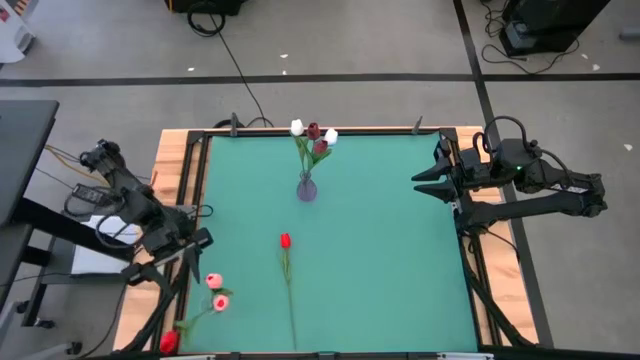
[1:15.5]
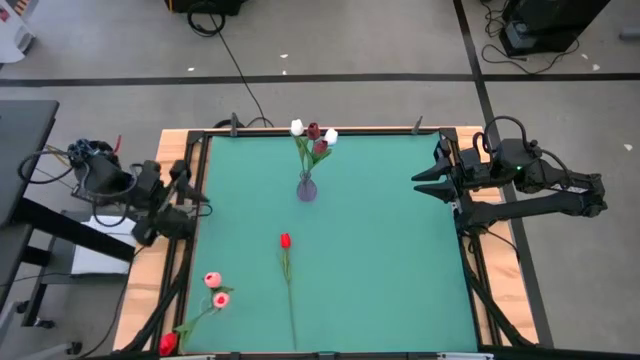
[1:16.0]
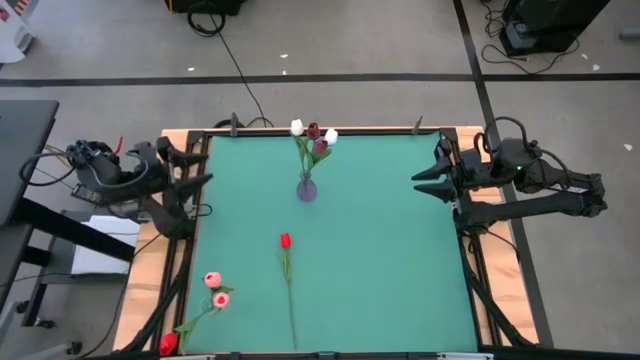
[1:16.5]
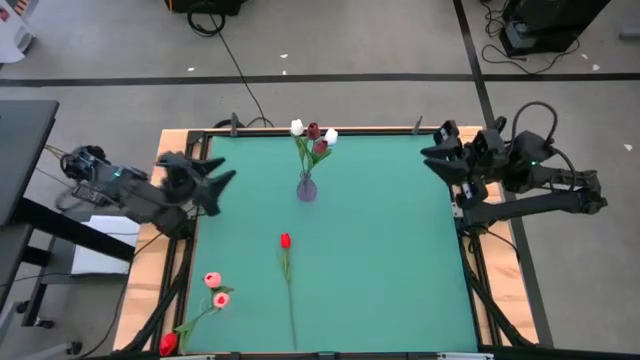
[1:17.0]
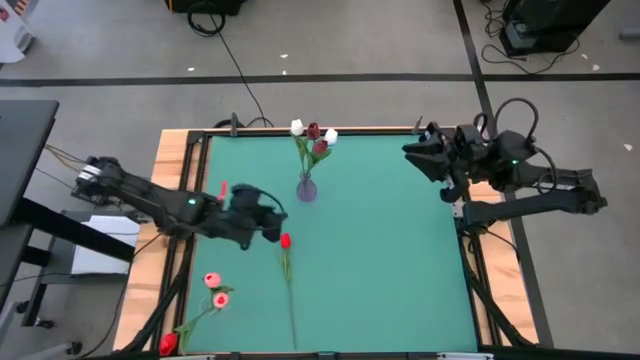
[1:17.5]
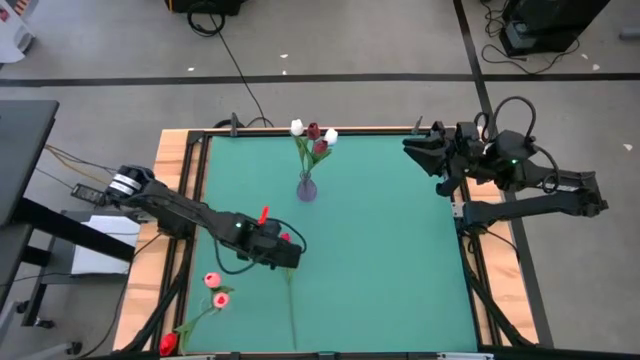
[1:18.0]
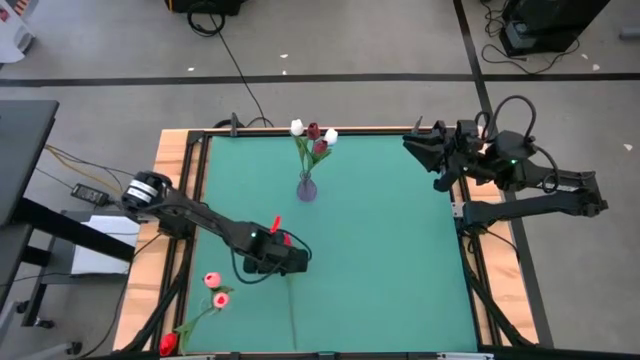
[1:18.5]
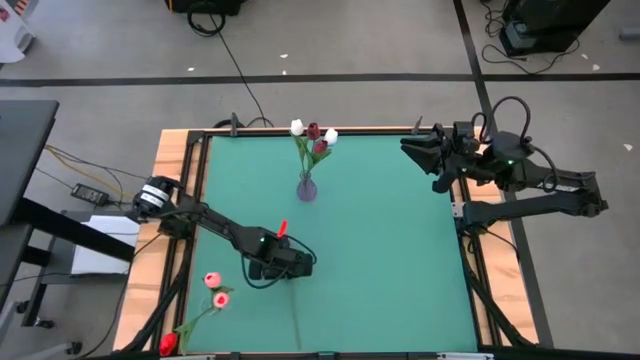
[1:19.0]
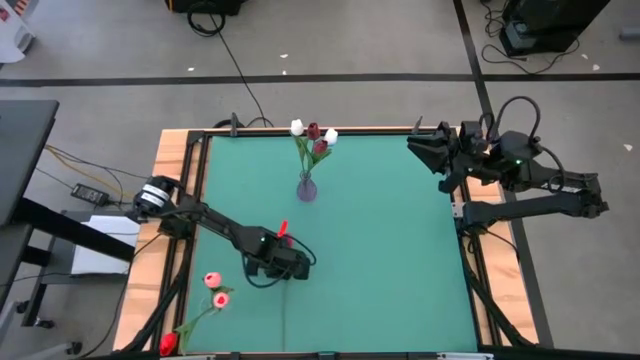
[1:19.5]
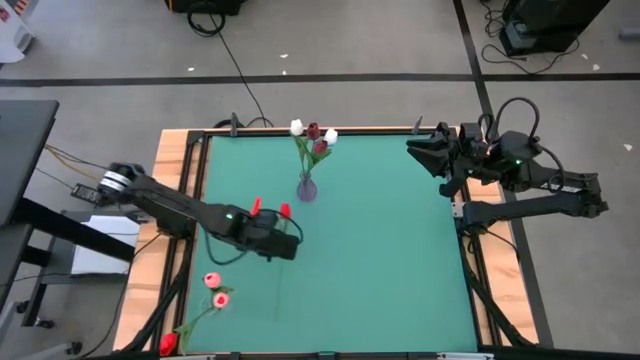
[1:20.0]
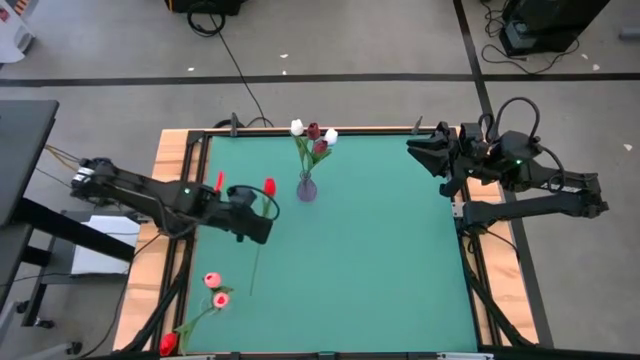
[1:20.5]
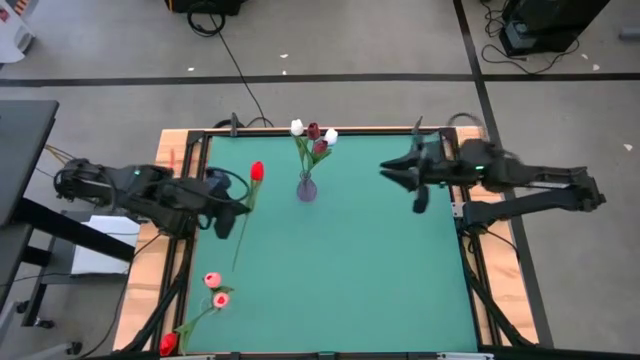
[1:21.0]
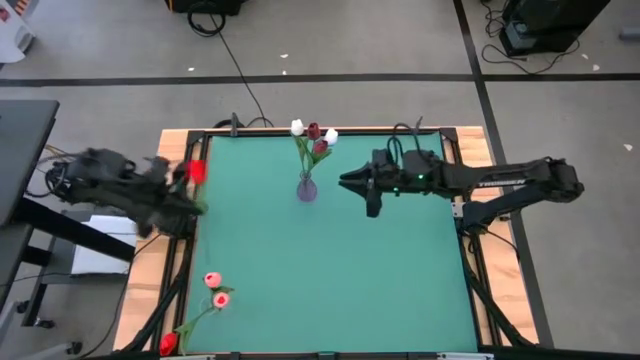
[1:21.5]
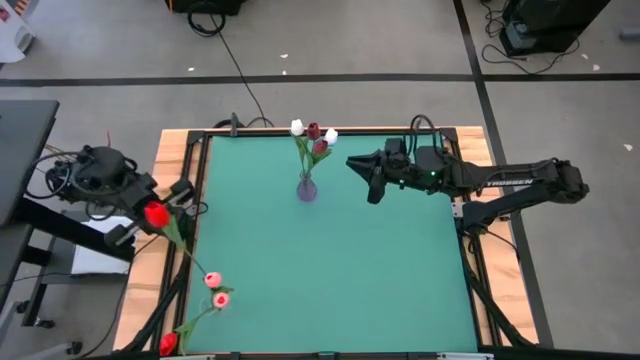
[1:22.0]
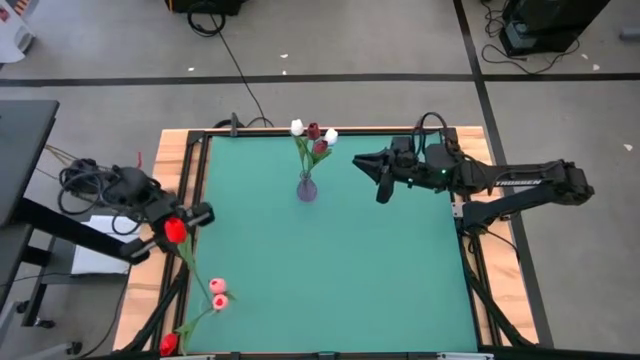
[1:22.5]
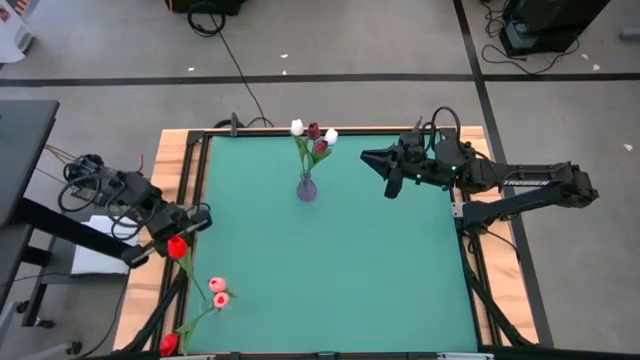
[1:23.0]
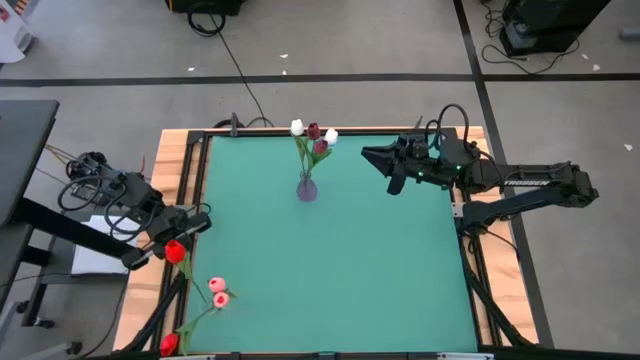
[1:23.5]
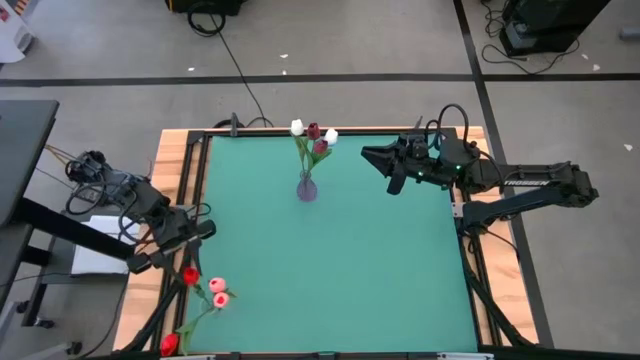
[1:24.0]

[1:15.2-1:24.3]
Task: Sort flowers into vase by color
Put the red tulip into the transparent vase

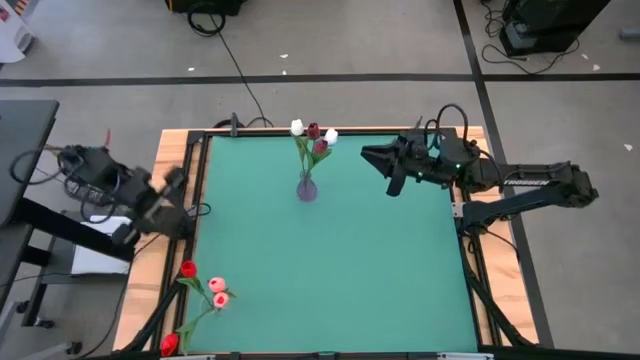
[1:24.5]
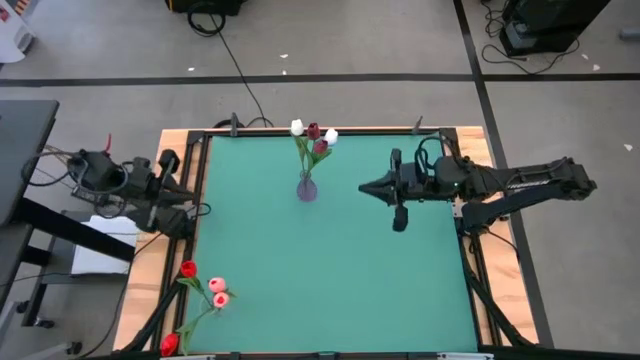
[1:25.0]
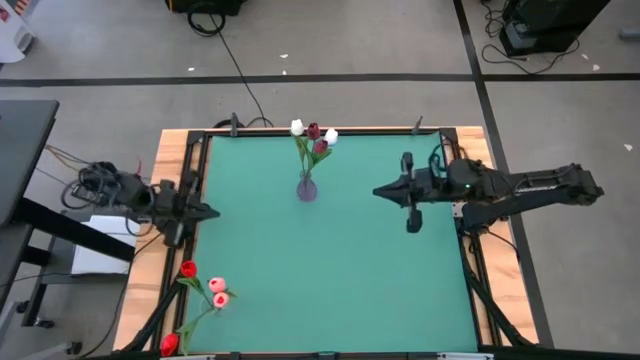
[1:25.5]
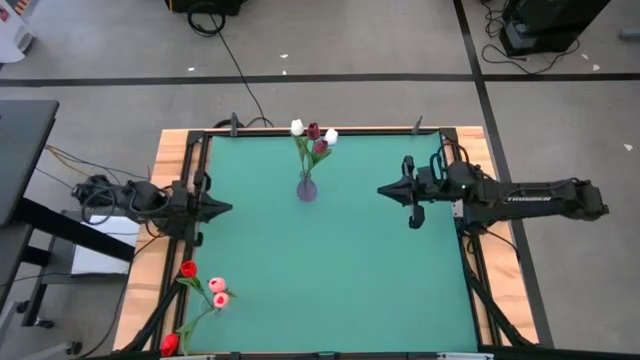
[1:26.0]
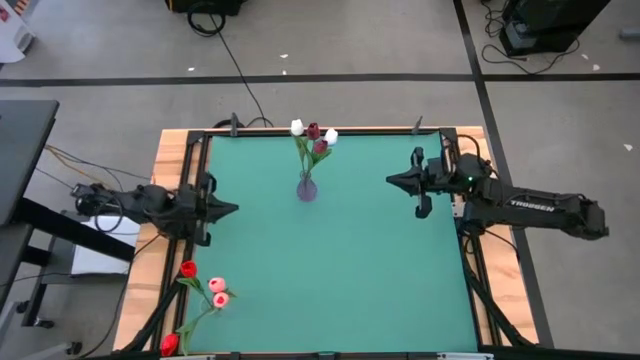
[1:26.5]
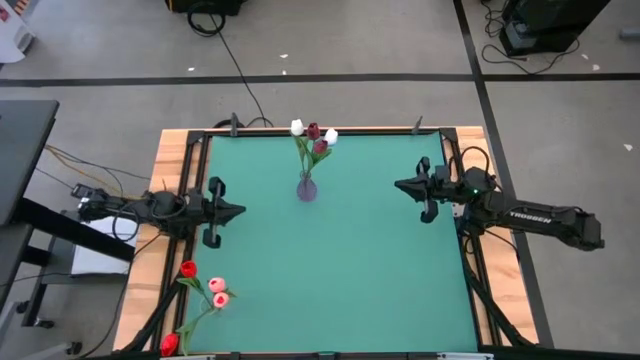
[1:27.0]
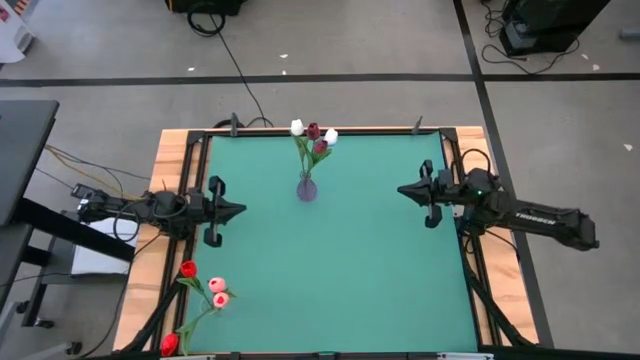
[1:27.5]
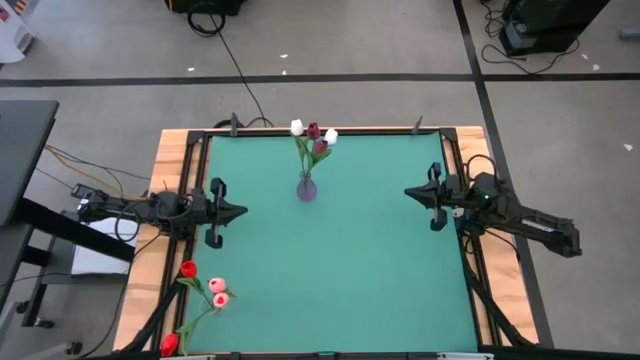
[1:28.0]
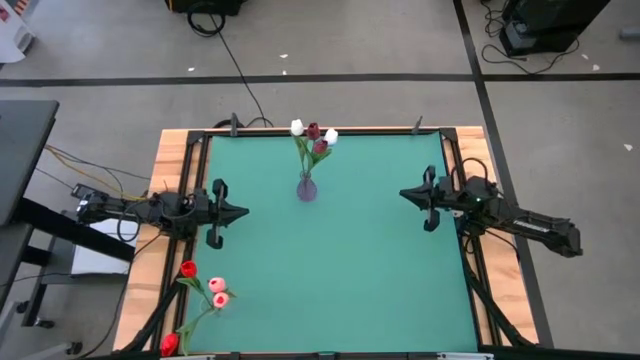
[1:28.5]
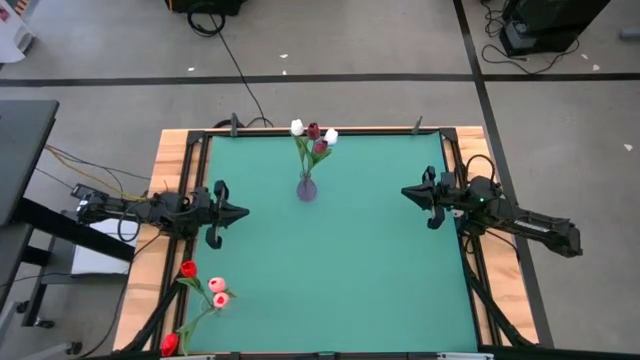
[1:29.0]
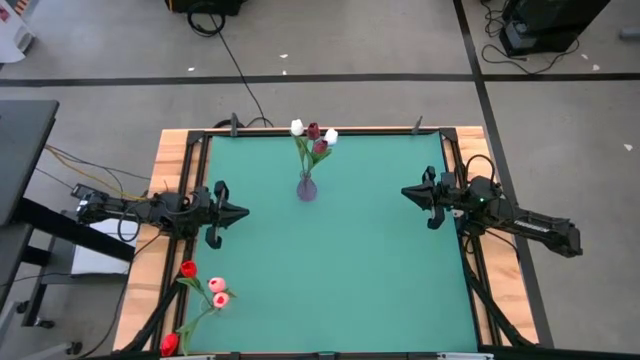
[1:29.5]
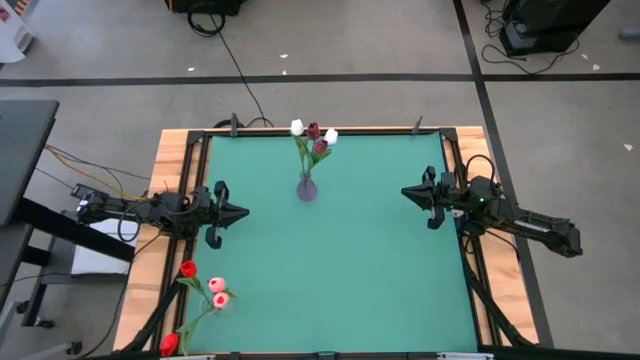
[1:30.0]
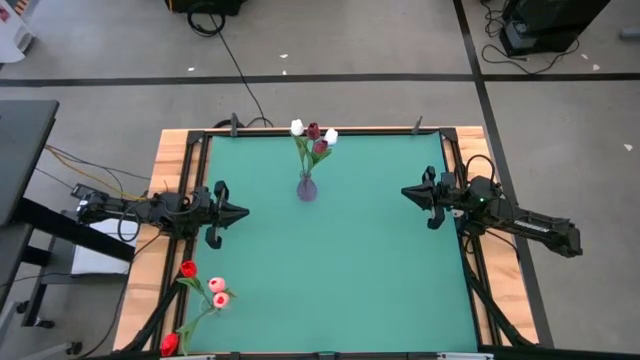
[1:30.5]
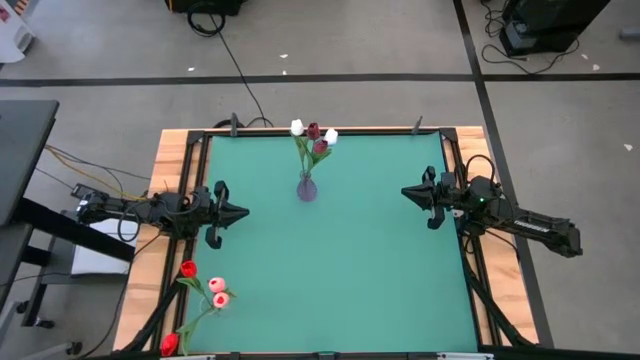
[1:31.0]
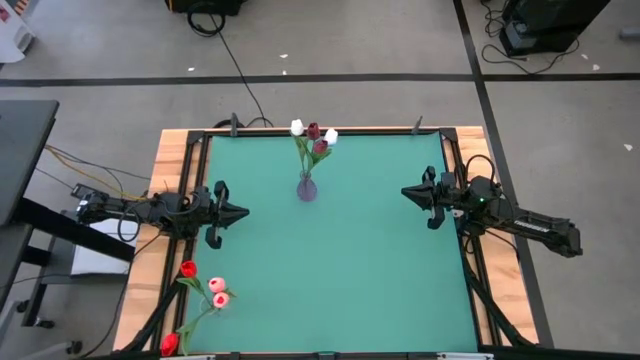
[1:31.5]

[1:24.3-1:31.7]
Return to Home Position

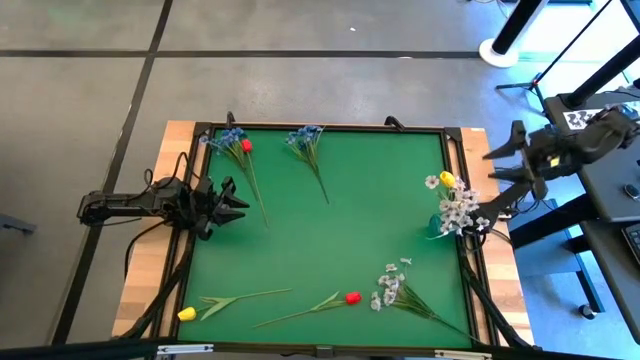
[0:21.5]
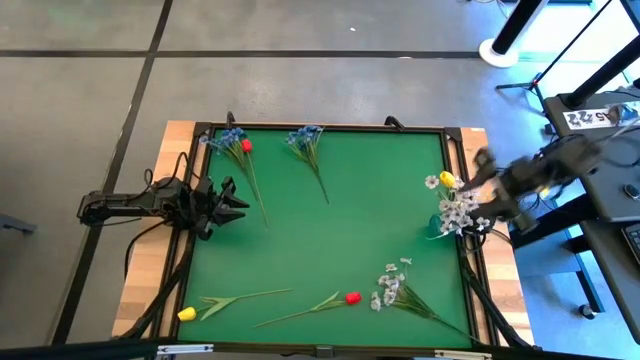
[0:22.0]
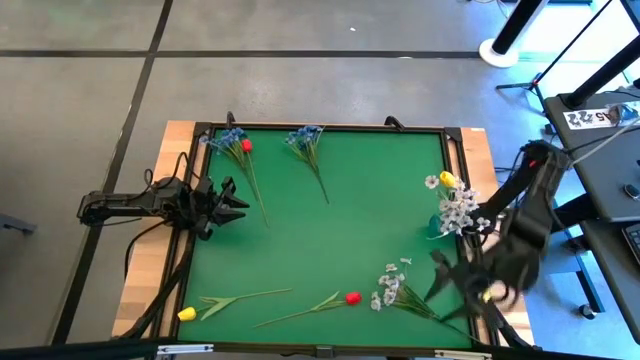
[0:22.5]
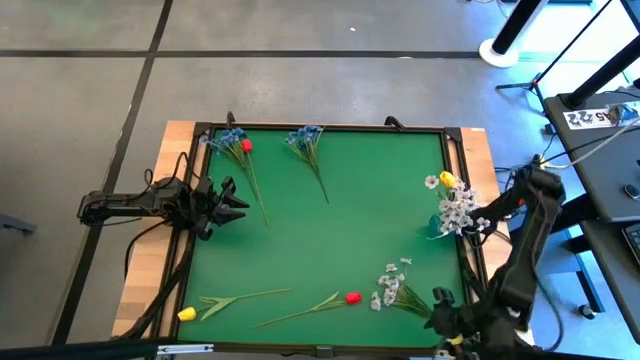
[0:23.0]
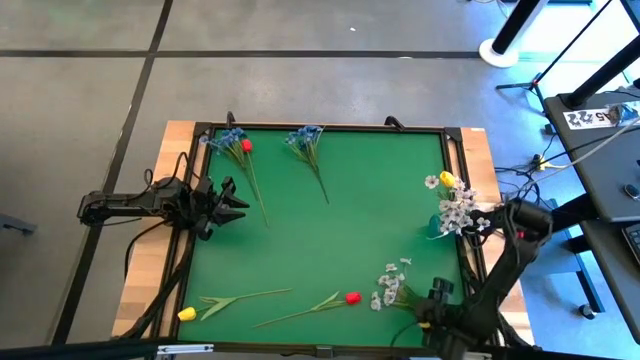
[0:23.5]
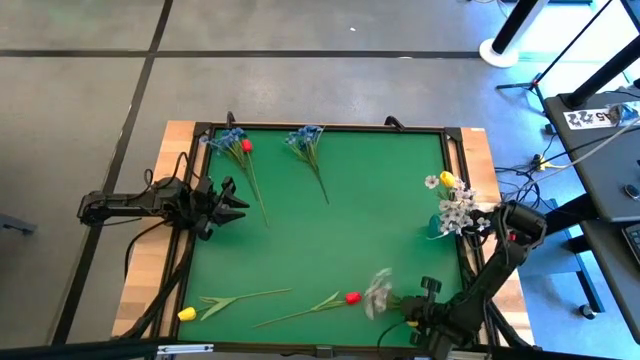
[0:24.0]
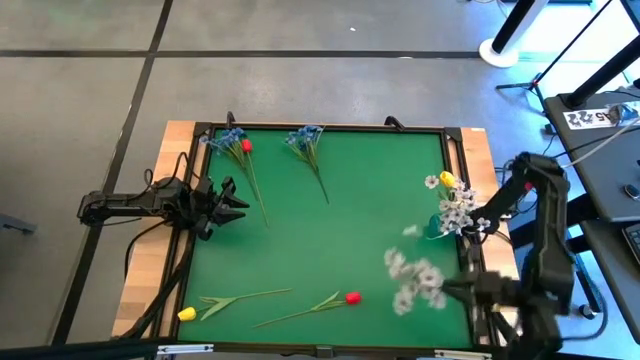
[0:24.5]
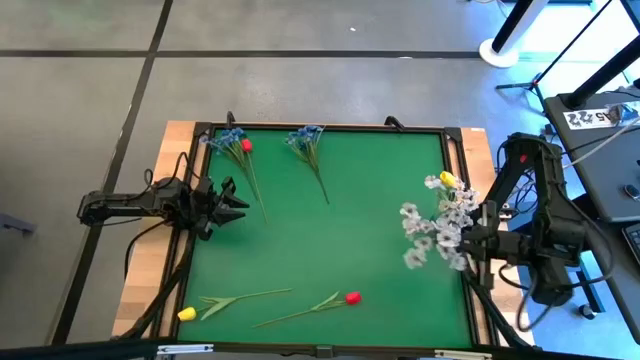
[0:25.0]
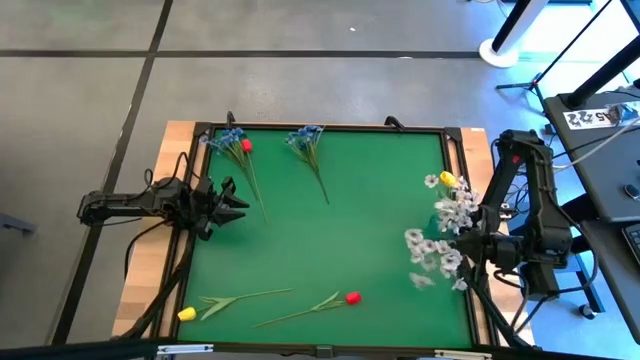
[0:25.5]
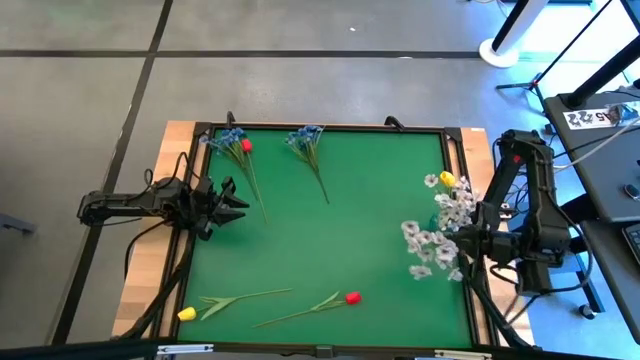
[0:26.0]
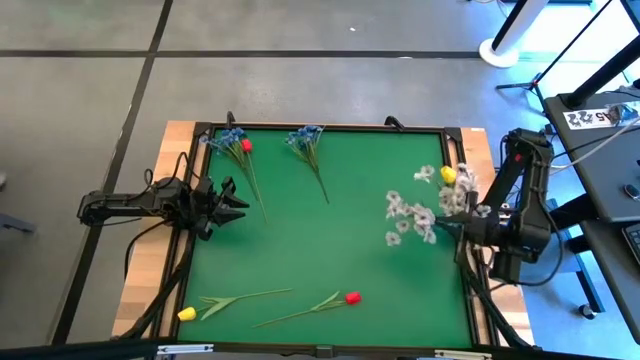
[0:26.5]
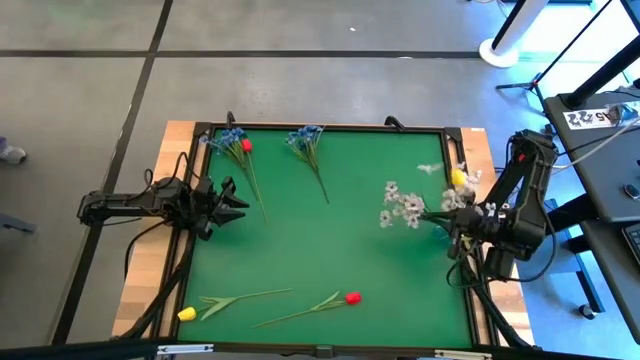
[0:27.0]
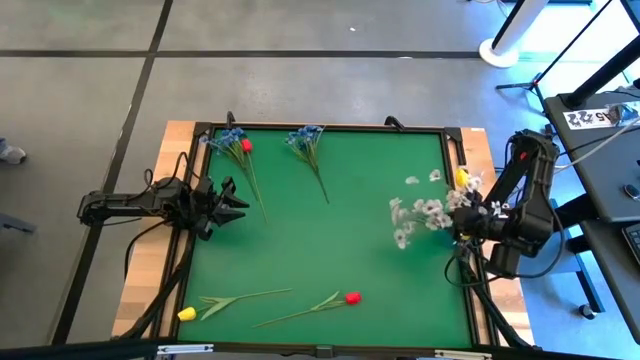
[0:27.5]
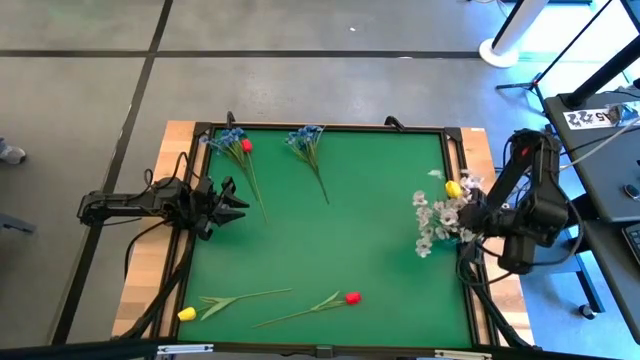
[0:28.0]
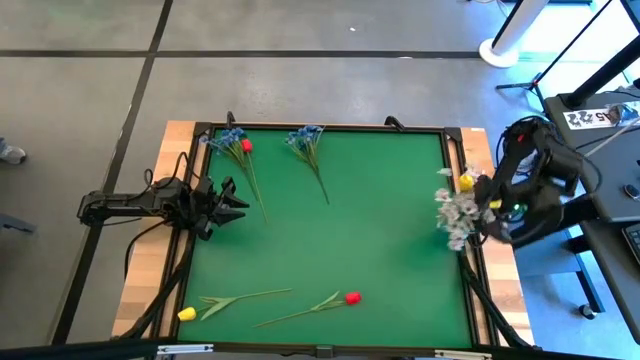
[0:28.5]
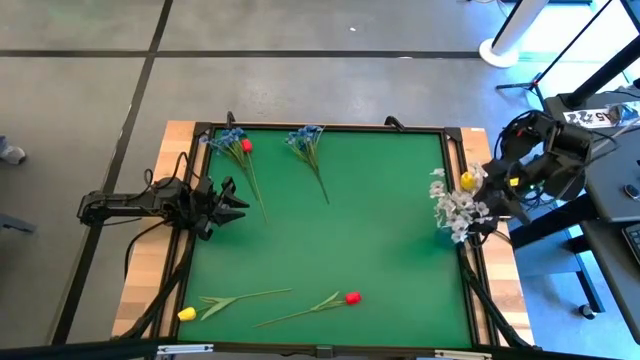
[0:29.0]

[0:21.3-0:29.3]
Task: Sort flowers into vase by color
Put the white flower into the blue vase
